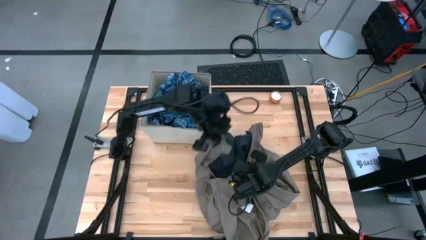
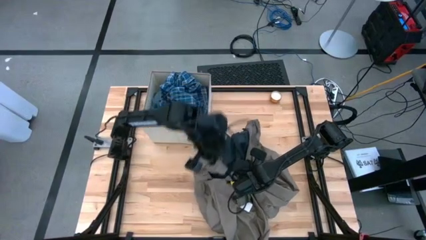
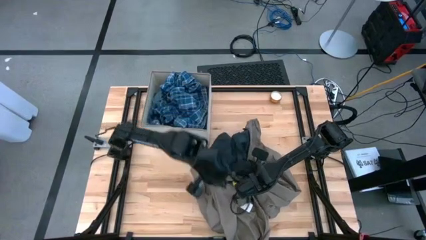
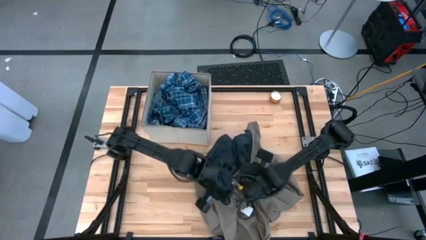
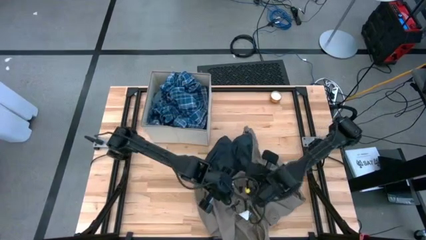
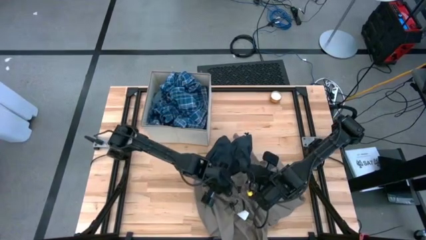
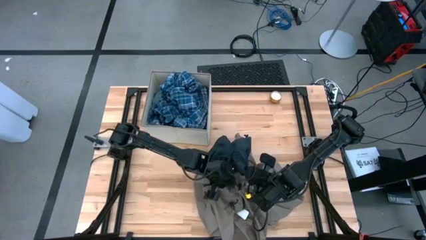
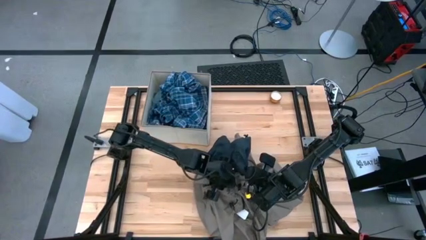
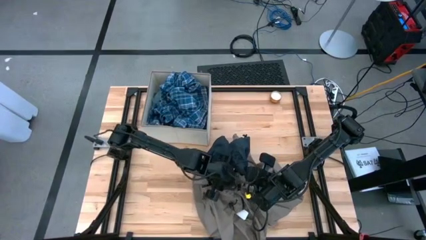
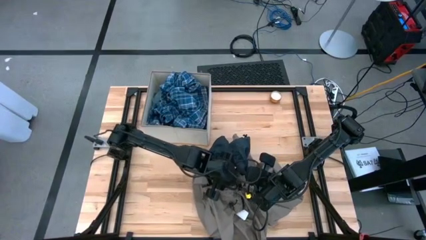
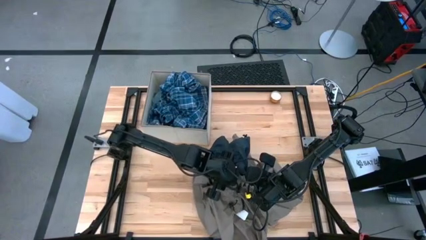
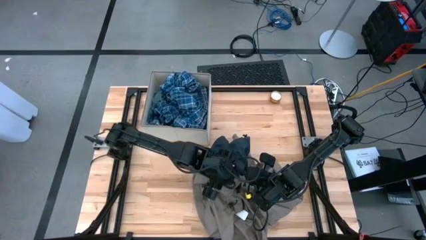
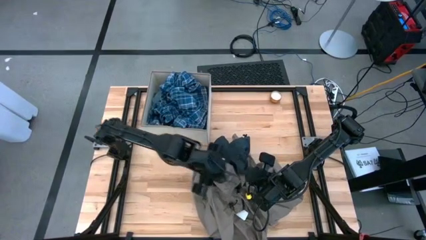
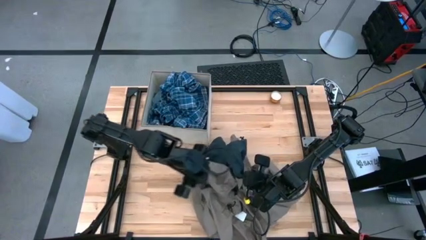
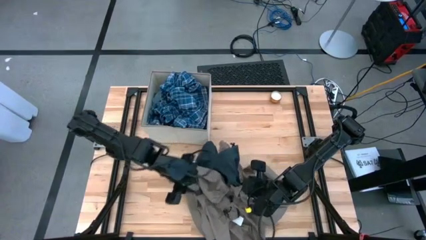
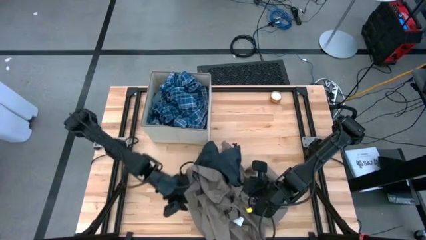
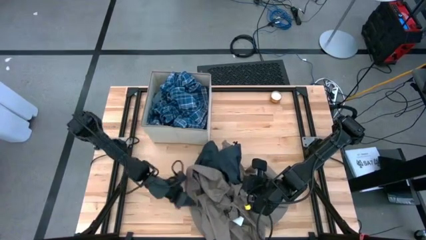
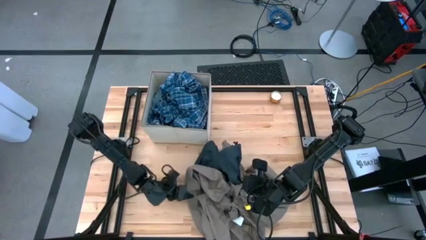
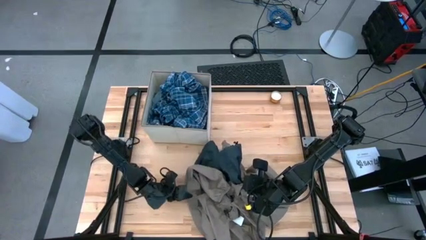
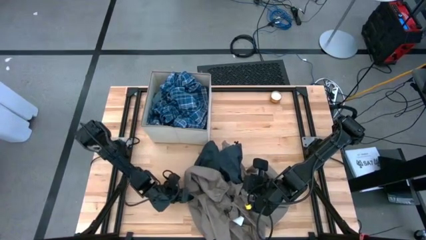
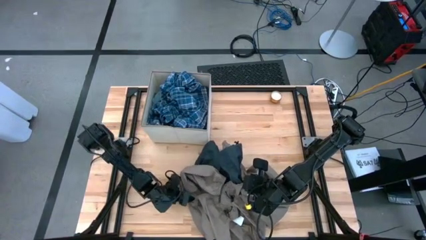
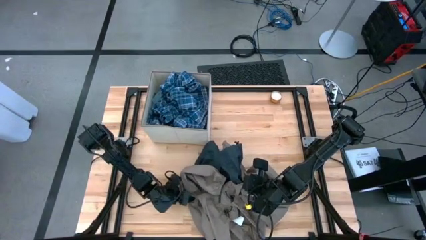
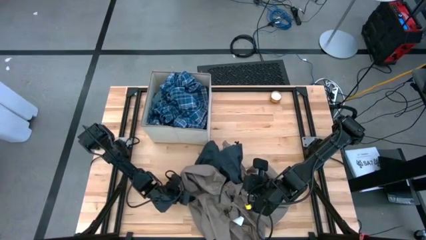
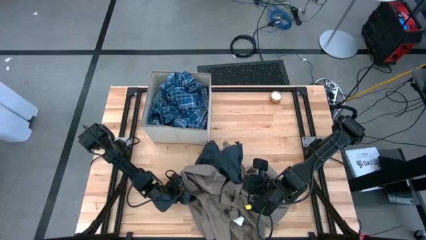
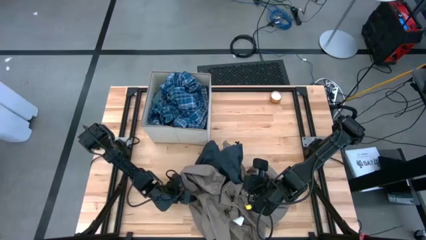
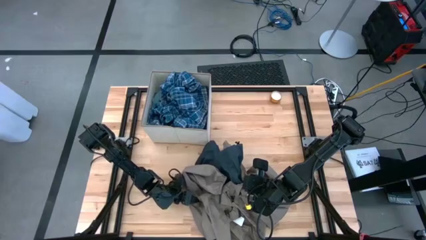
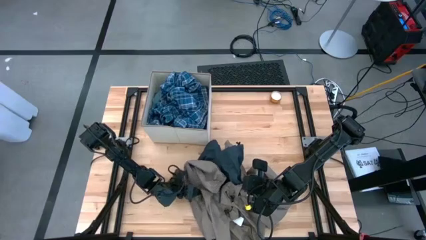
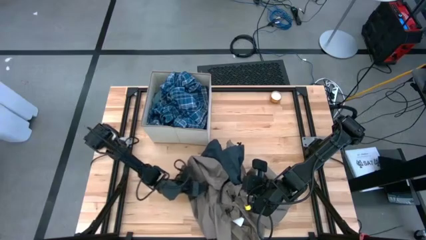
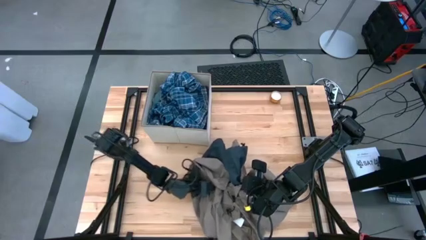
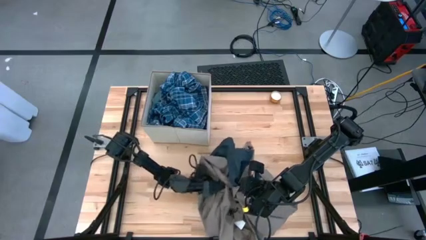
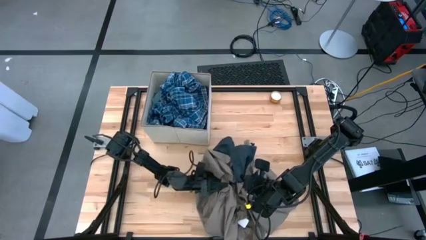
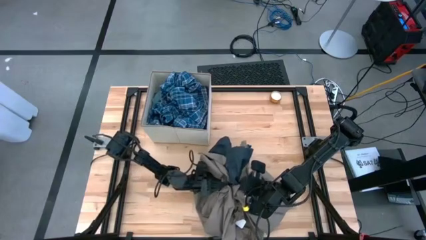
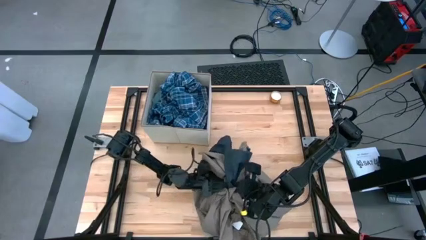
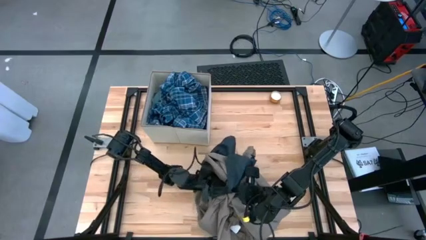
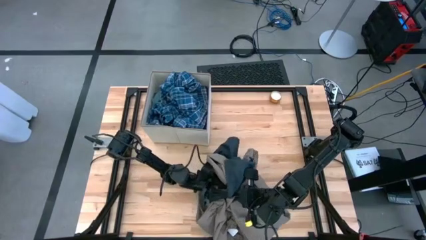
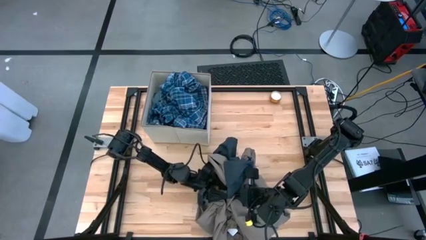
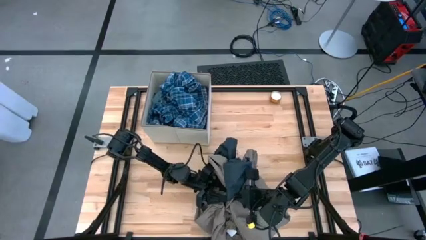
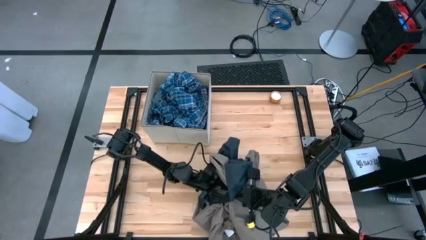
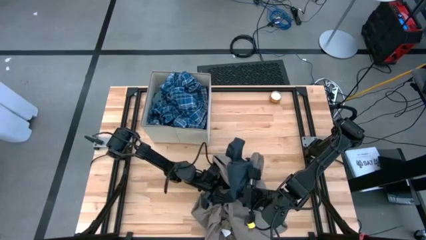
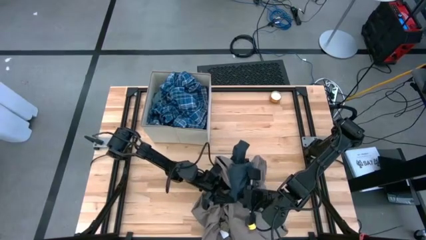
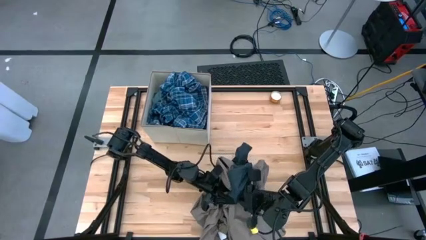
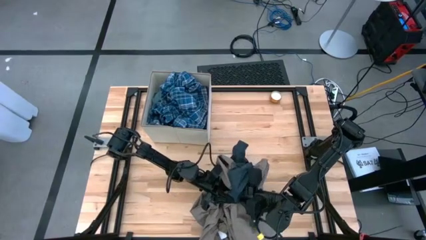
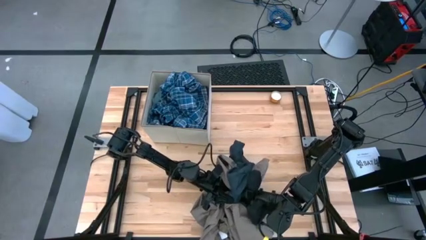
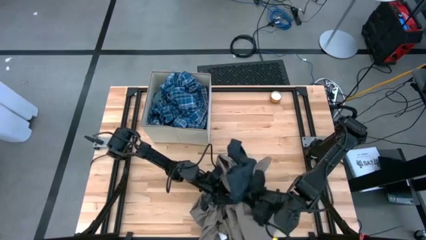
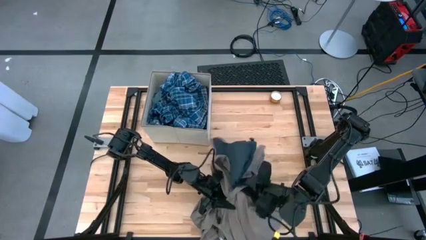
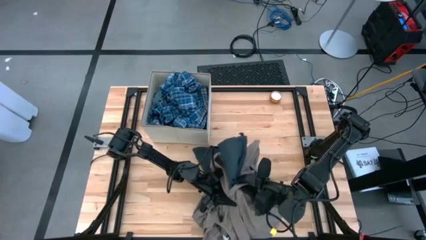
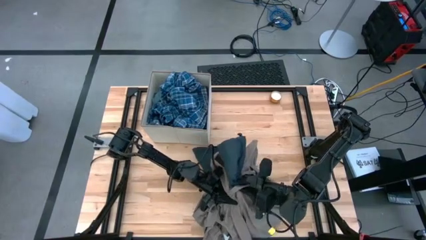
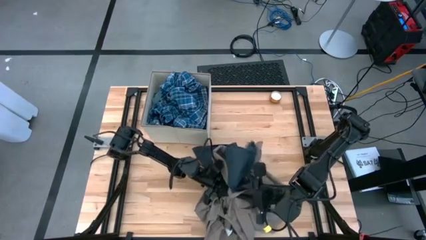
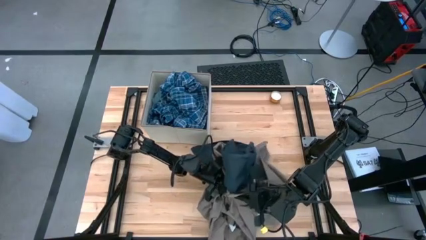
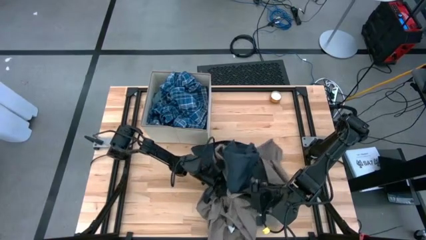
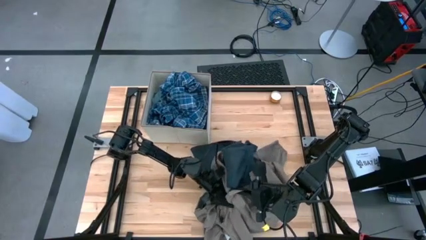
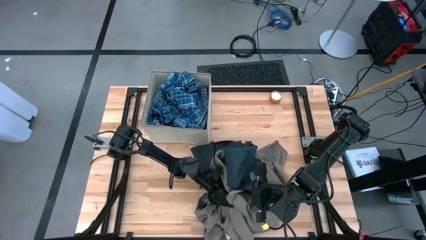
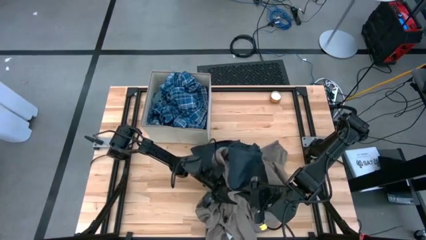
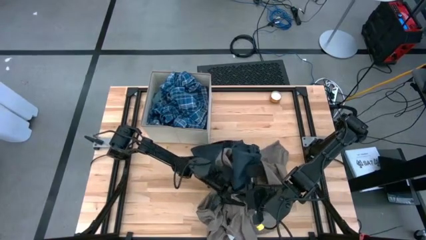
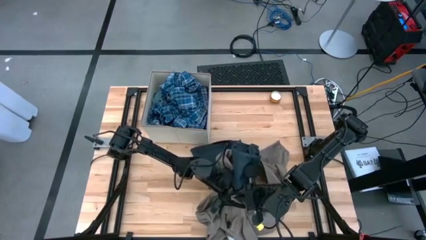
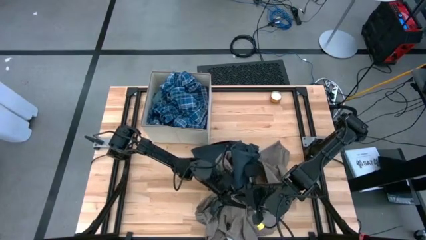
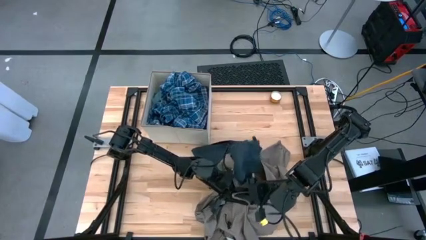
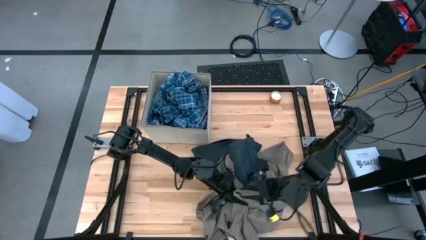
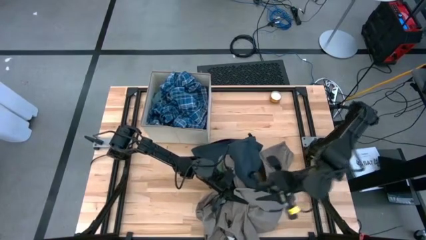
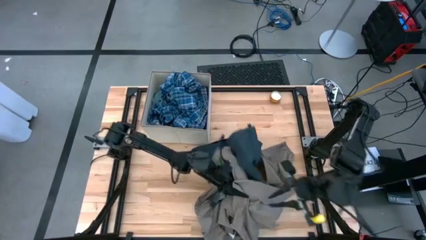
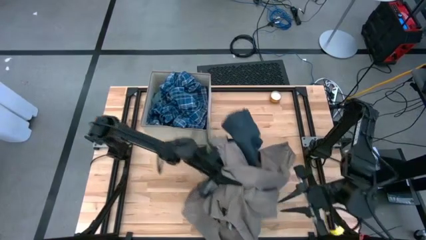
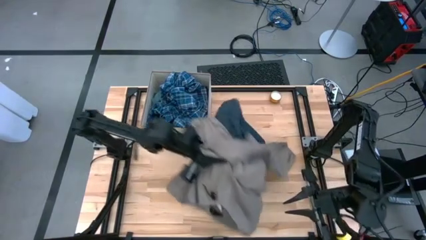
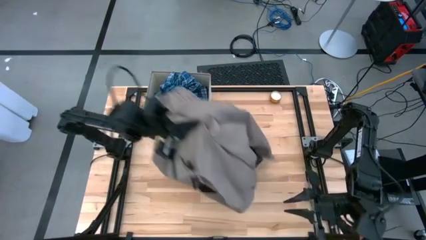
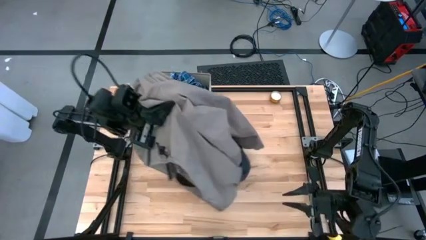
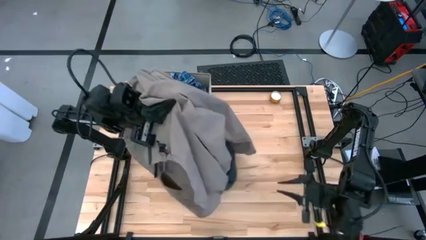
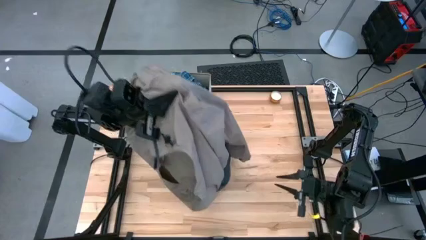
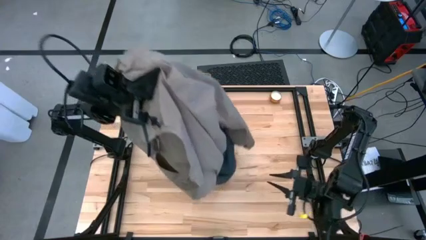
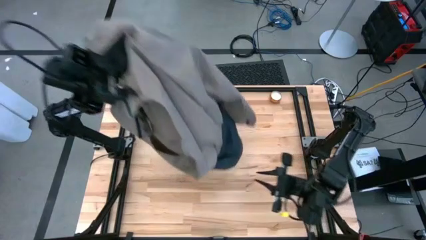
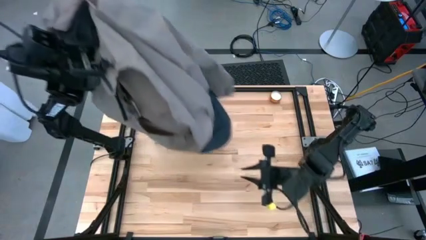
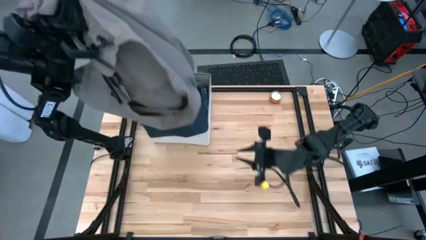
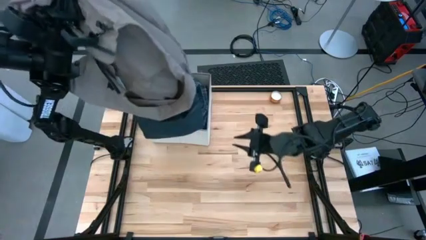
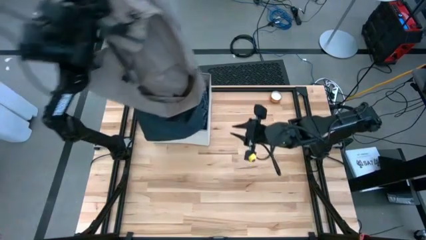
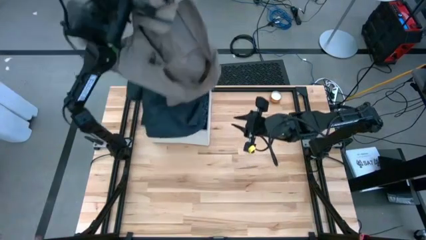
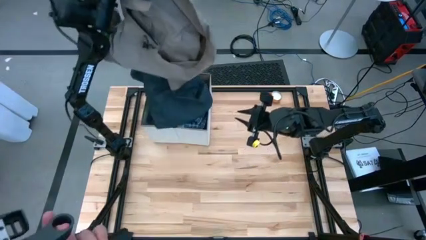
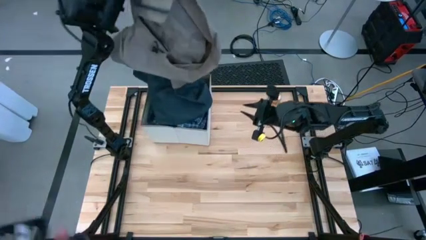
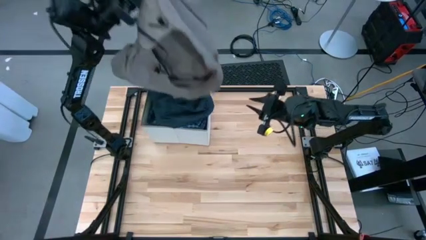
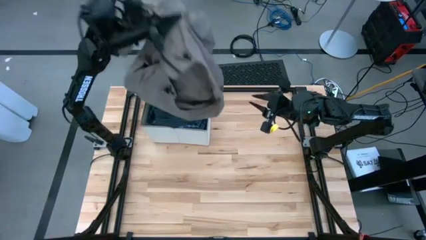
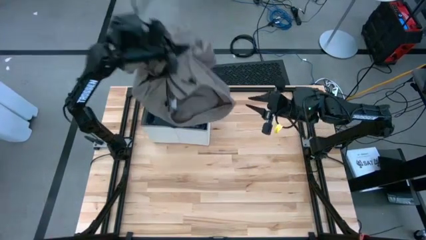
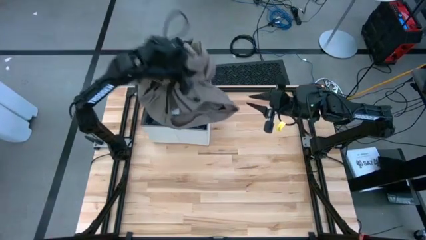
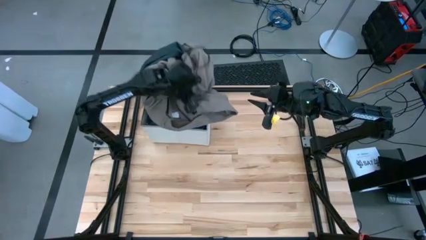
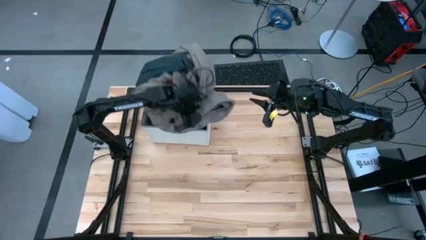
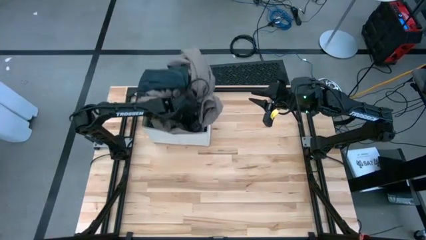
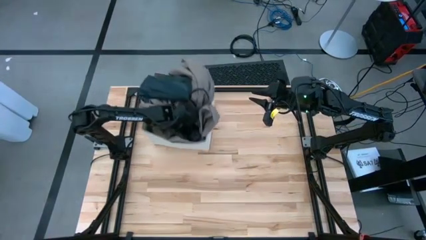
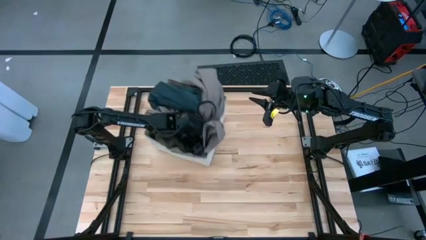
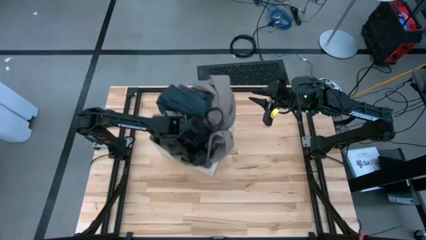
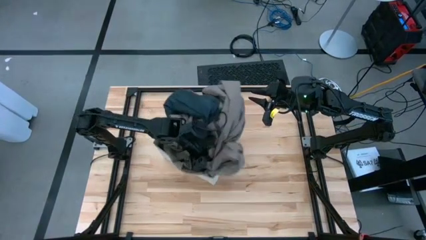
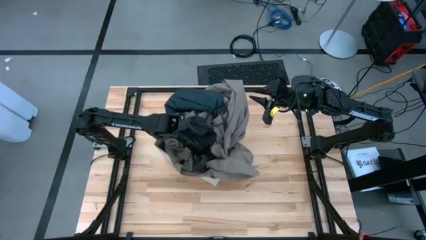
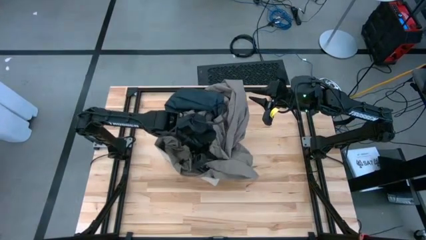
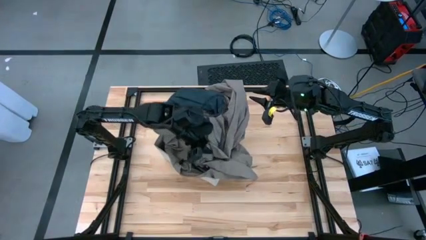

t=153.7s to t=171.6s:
Task: Sort clothes
Put the brown jacket into the laundry organizer
